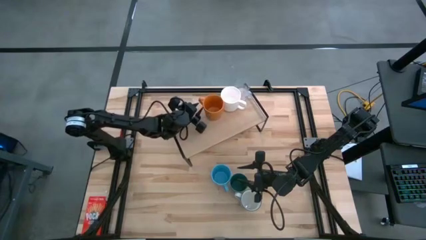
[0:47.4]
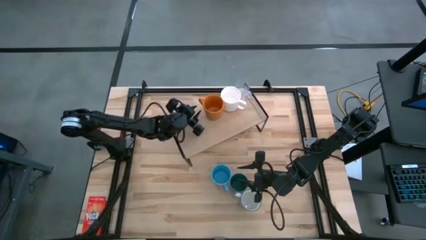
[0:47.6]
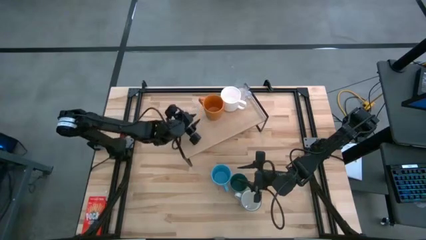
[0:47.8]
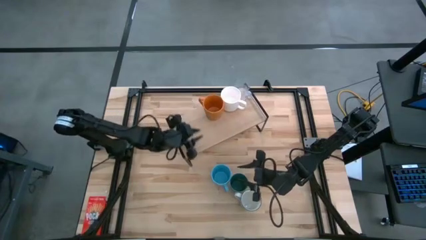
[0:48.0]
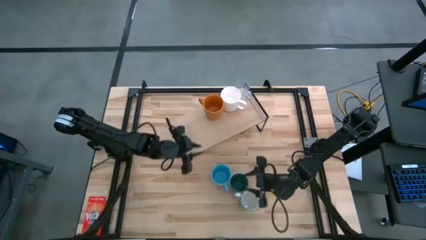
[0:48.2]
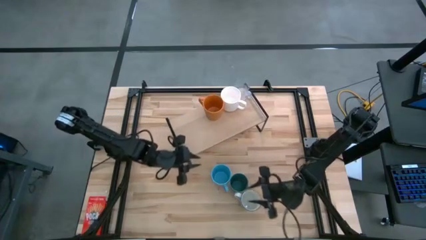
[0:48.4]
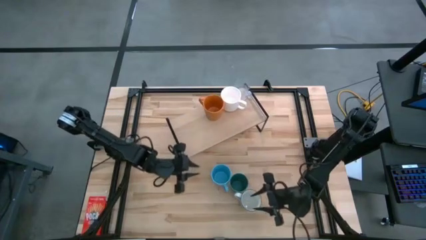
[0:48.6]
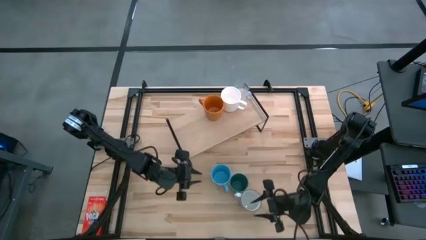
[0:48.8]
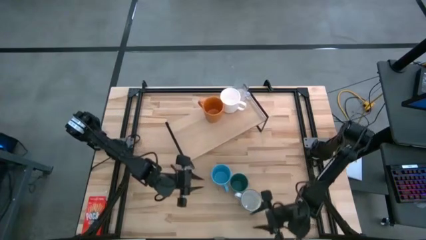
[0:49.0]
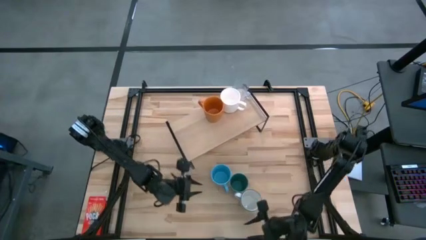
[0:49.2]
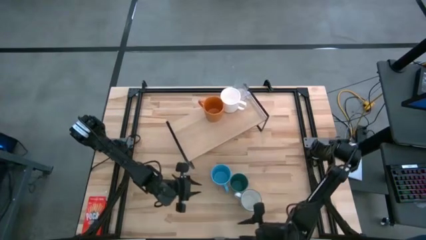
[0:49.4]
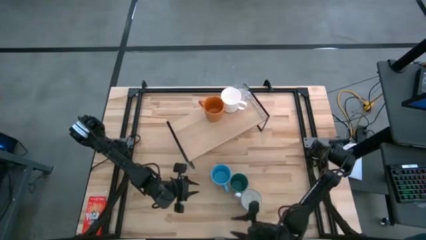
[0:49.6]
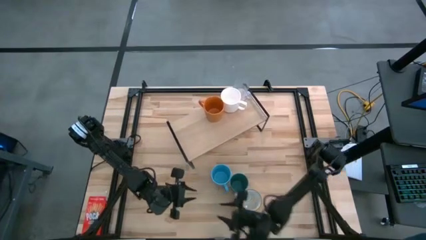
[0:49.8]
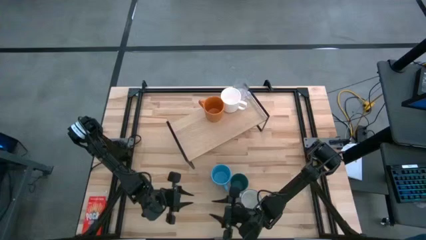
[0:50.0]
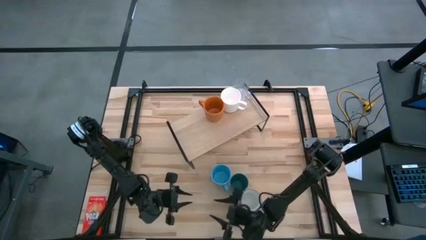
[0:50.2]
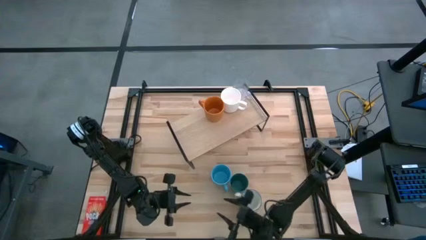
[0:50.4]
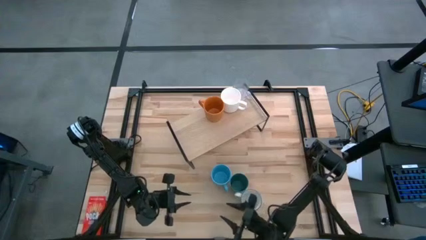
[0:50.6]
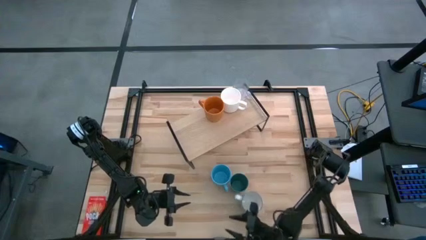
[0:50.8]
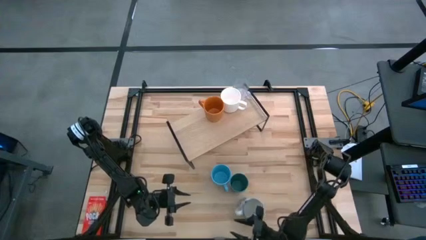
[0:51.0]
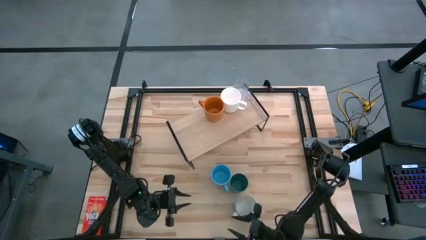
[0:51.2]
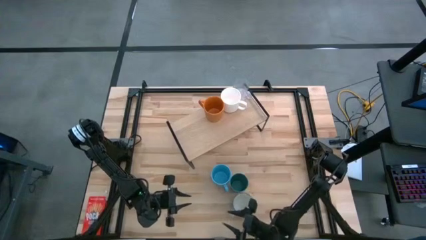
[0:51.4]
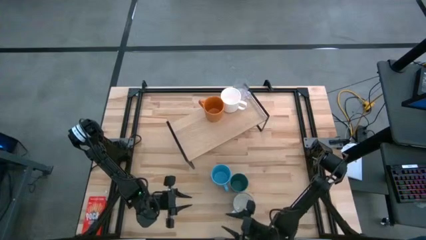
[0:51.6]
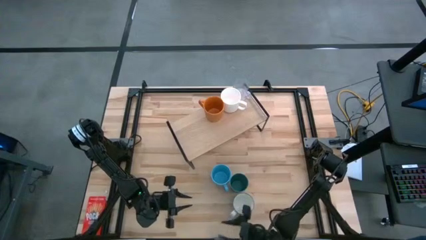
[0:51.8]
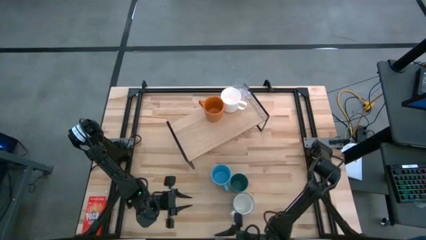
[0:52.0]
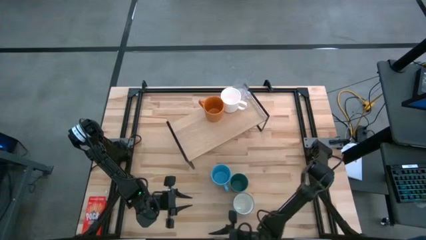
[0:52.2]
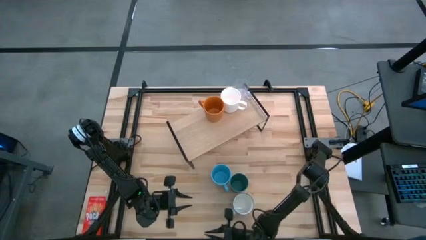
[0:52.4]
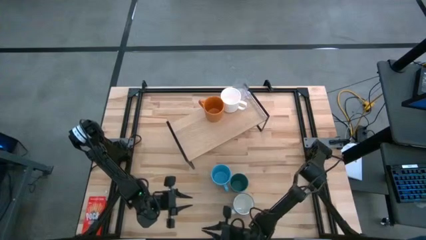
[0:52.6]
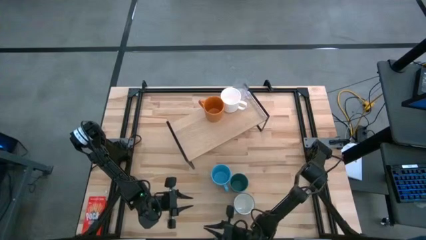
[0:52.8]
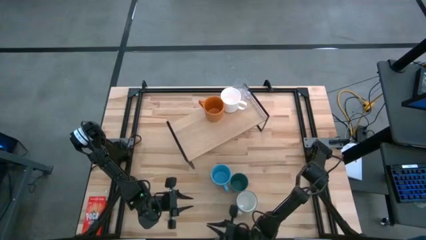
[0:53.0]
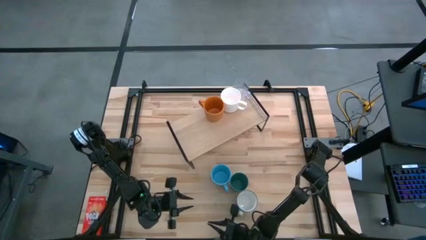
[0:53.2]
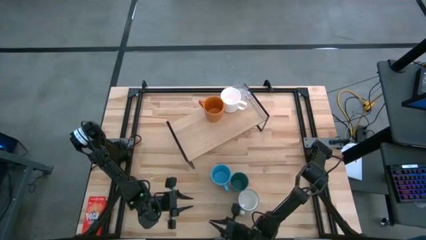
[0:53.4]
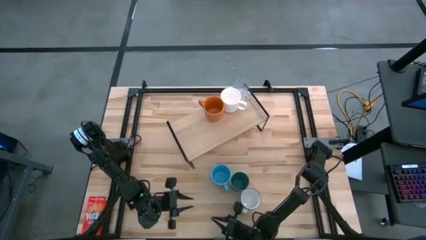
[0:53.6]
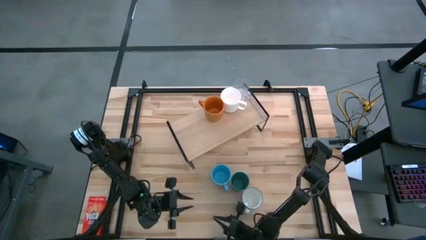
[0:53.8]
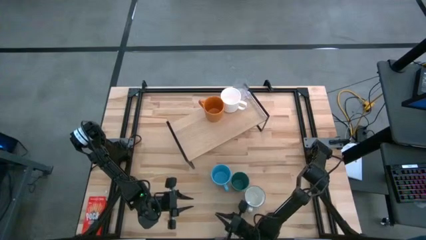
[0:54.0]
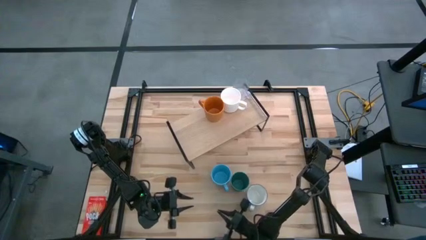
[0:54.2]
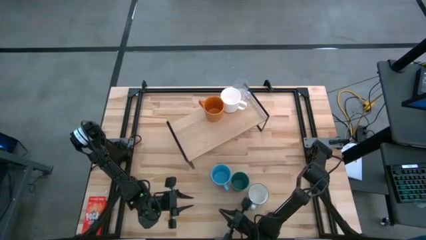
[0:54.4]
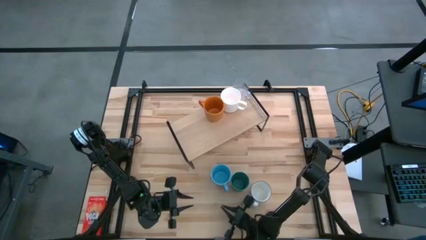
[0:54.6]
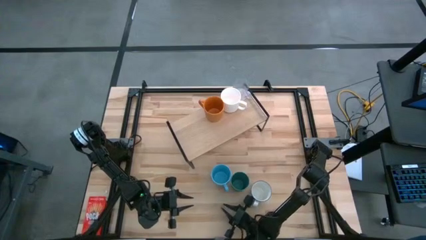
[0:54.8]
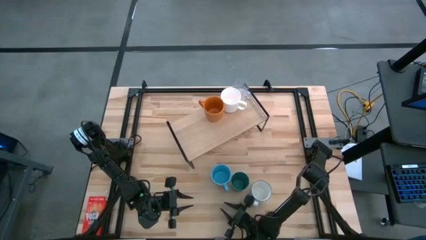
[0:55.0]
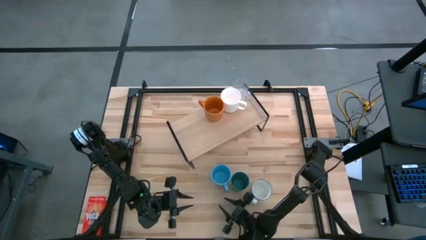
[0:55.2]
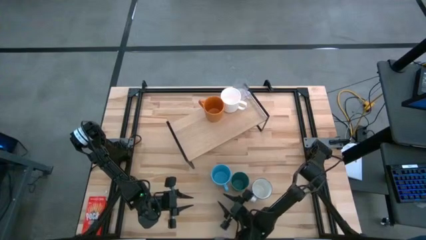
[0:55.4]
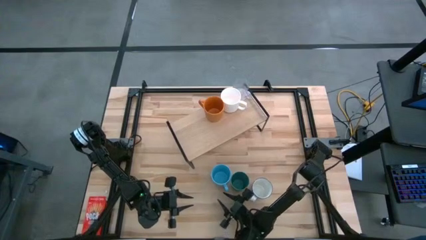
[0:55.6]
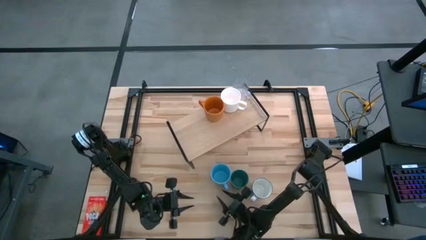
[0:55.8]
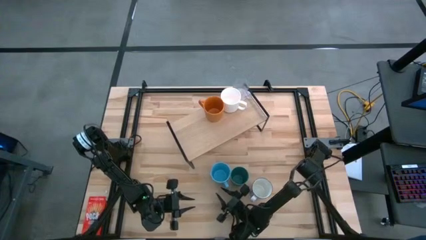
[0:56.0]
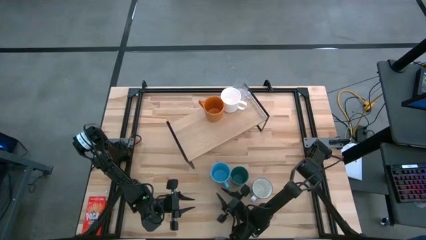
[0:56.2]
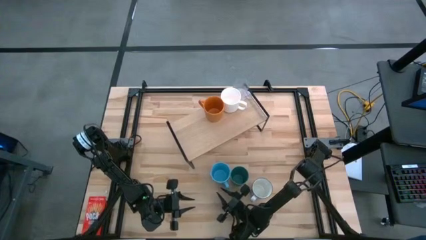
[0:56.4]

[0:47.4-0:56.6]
Task: Stack small to large cups/mugs on shelf
Put the blue mug on the shelf

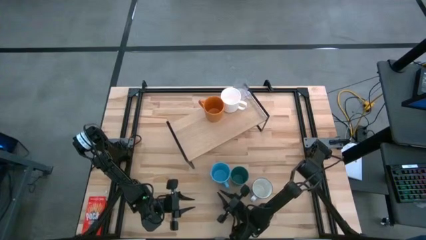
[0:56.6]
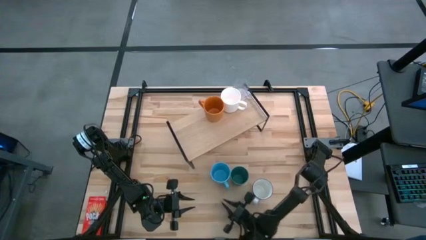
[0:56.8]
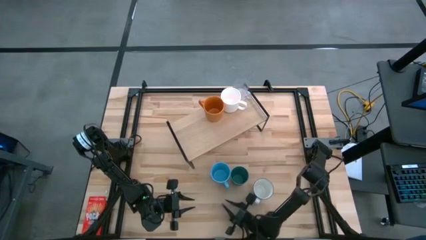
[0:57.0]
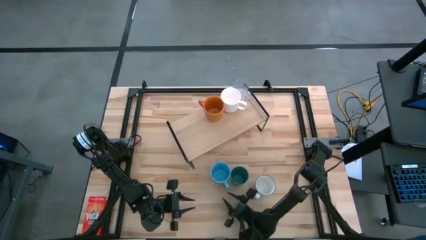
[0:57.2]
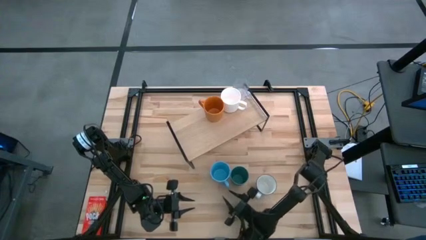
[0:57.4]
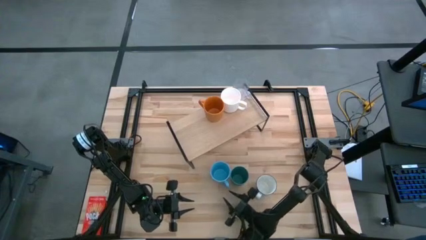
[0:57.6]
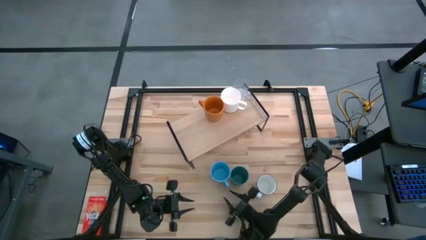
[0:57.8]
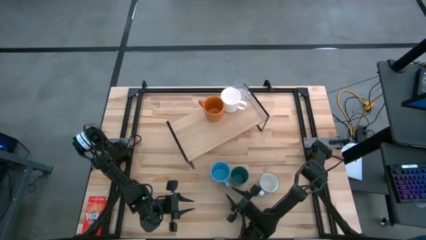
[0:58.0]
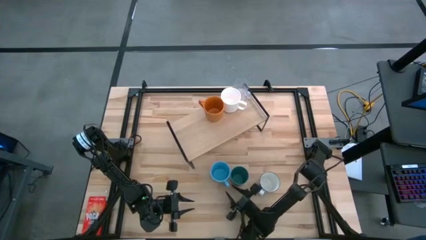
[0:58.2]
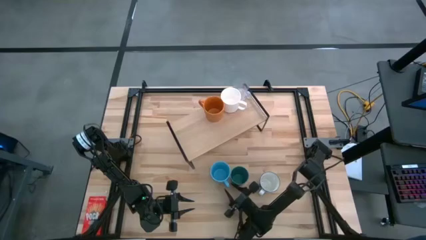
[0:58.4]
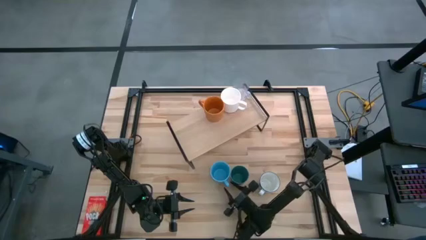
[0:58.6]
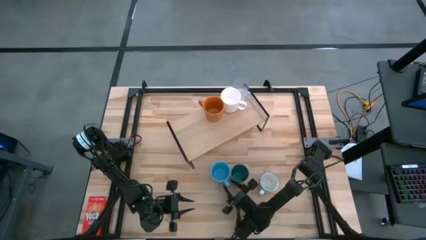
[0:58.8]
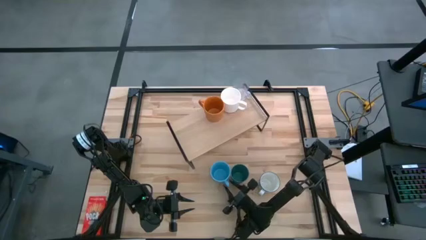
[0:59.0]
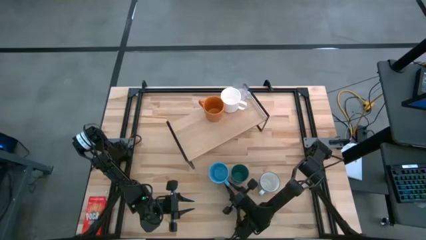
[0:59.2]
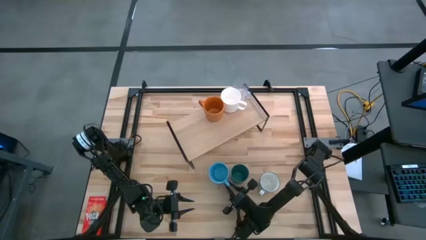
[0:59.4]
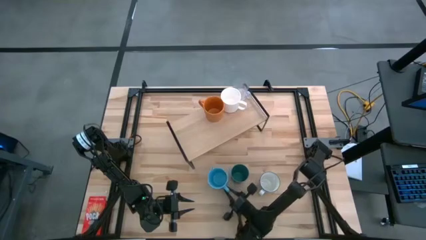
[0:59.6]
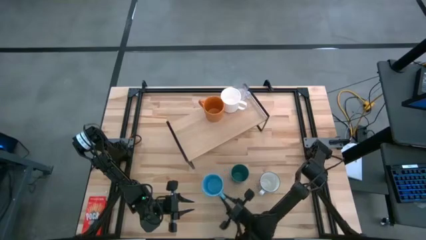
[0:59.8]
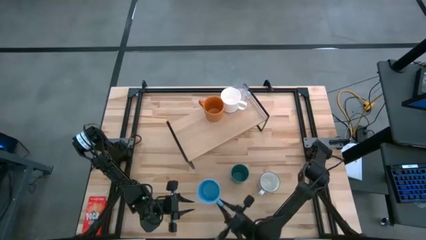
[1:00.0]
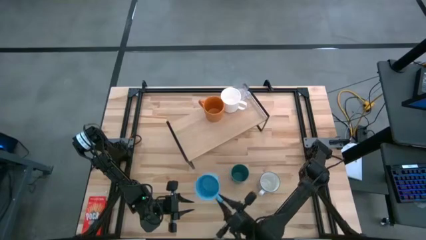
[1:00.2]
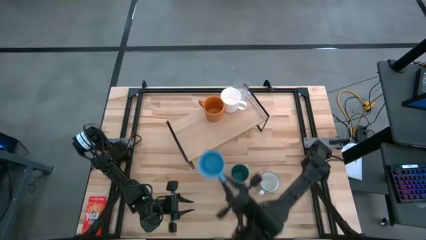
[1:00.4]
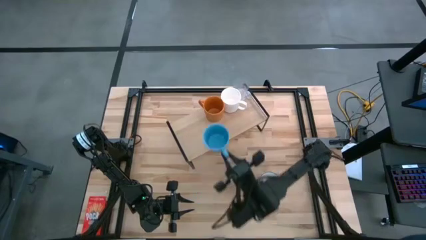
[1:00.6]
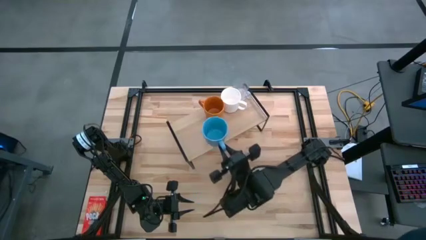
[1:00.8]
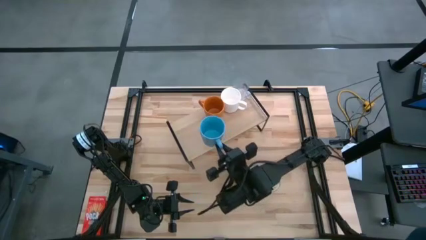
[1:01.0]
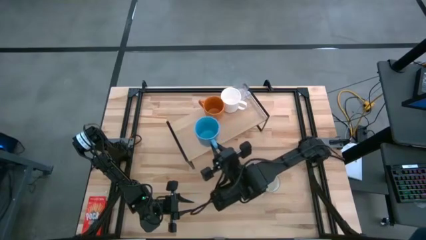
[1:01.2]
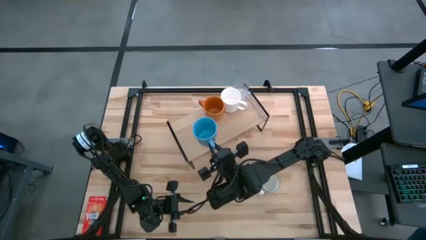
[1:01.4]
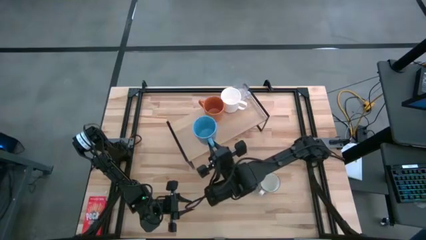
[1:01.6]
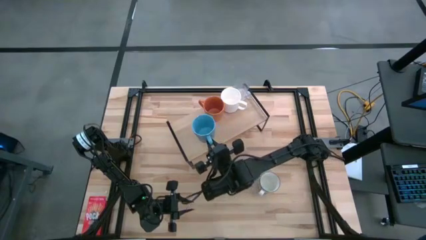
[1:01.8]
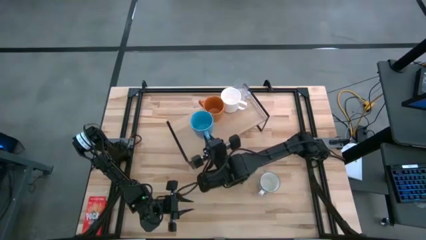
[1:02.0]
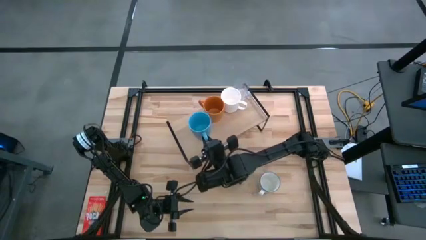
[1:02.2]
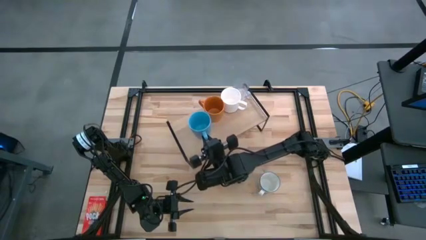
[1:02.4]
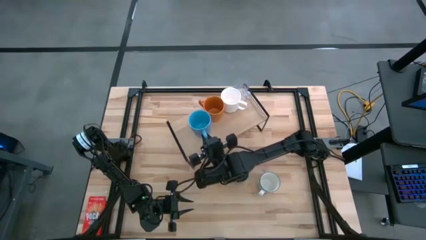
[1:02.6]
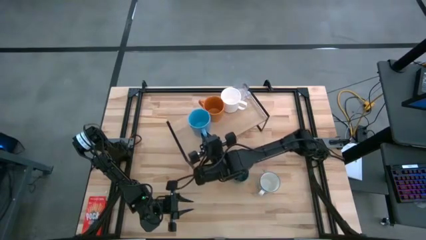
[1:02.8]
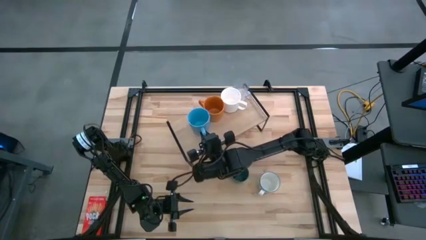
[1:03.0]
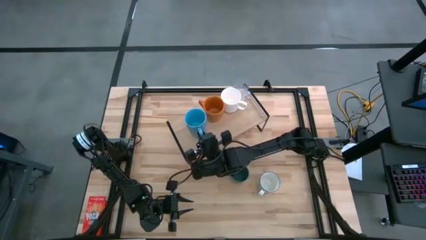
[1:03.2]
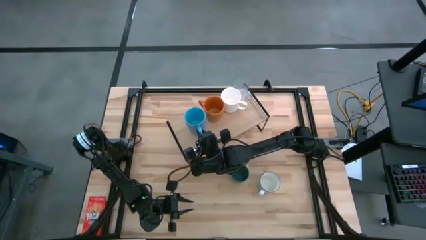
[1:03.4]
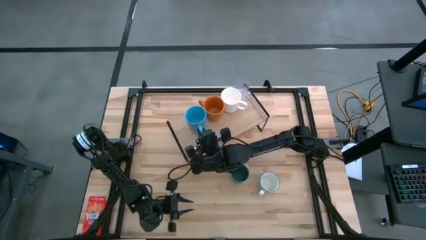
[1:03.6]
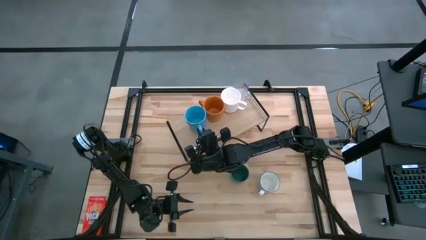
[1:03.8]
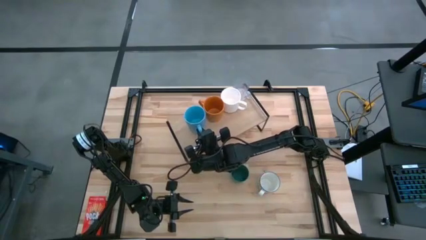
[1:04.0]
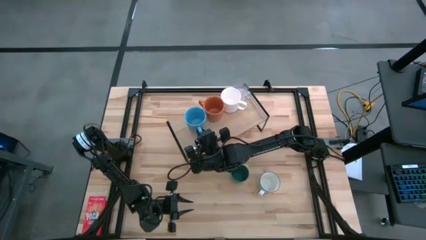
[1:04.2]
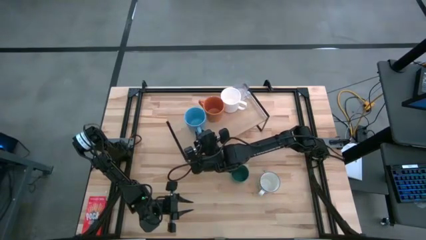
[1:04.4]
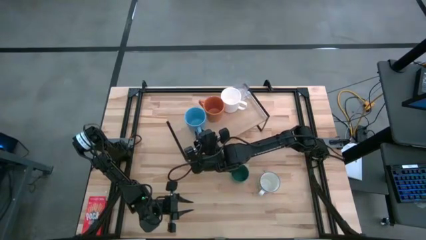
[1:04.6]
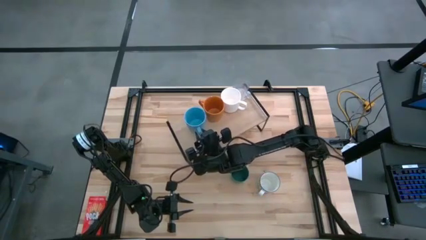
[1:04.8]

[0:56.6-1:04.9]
Put the blue mug on the shelf
